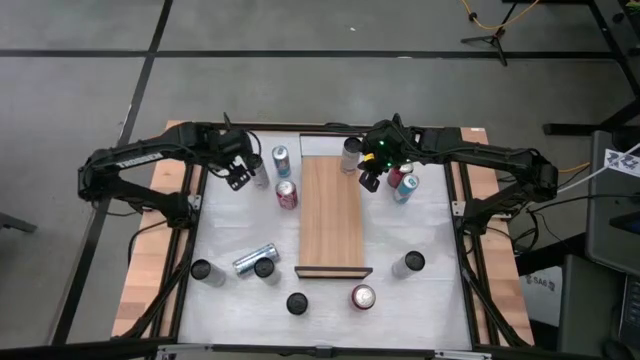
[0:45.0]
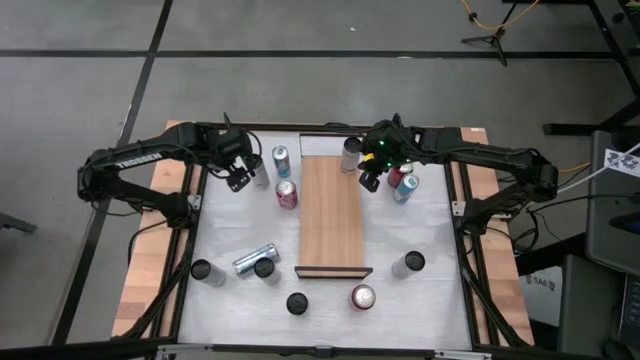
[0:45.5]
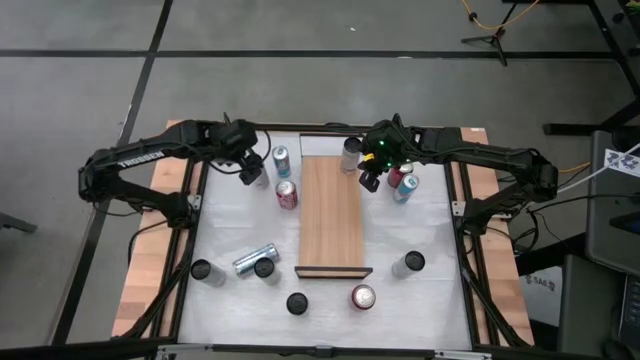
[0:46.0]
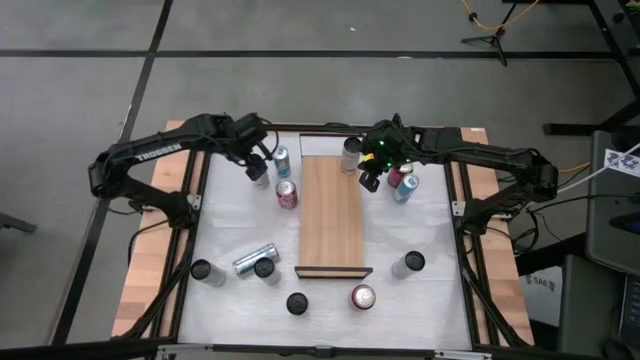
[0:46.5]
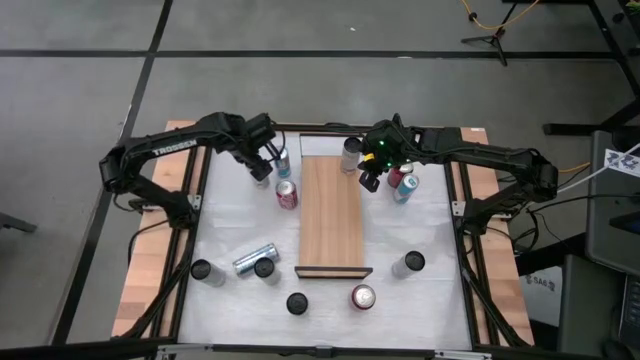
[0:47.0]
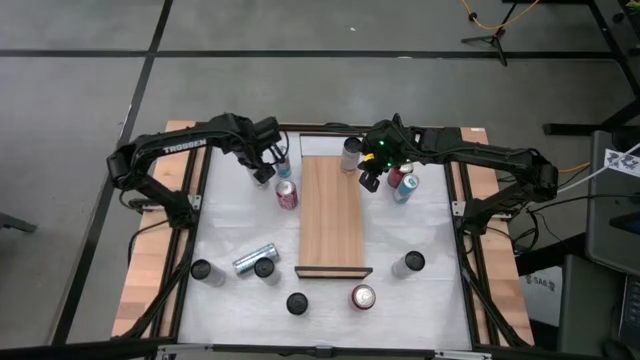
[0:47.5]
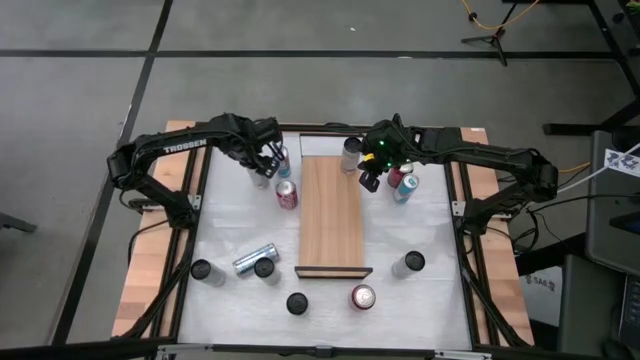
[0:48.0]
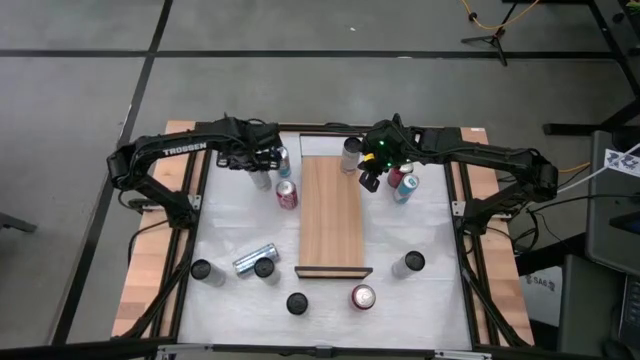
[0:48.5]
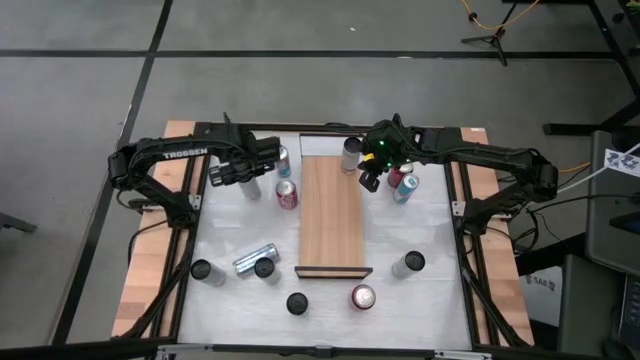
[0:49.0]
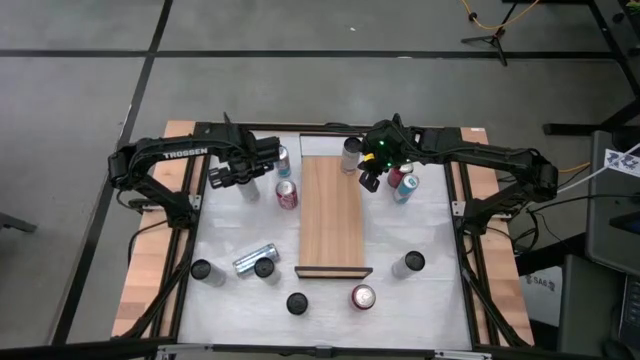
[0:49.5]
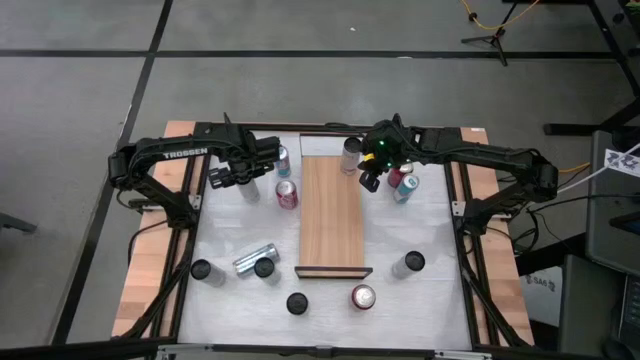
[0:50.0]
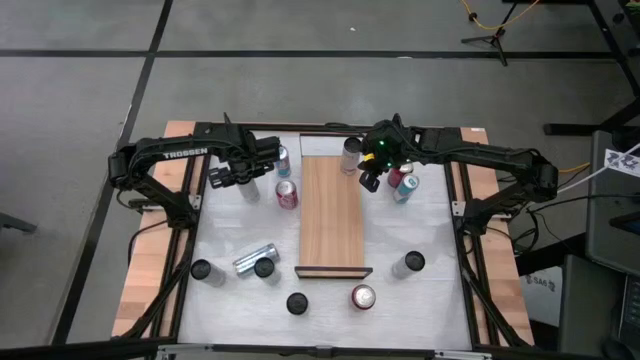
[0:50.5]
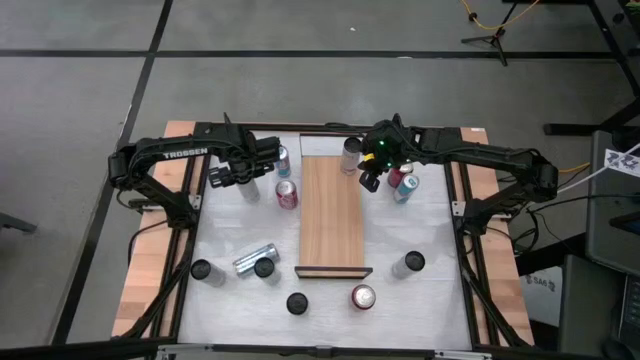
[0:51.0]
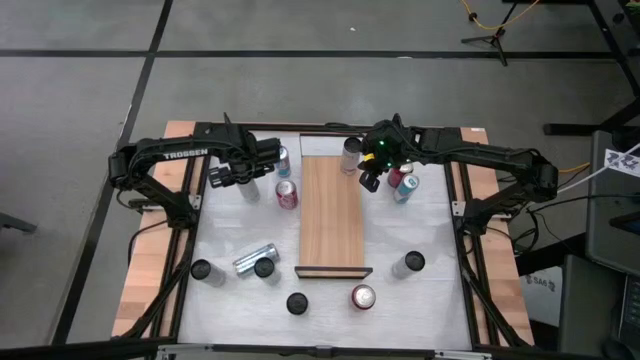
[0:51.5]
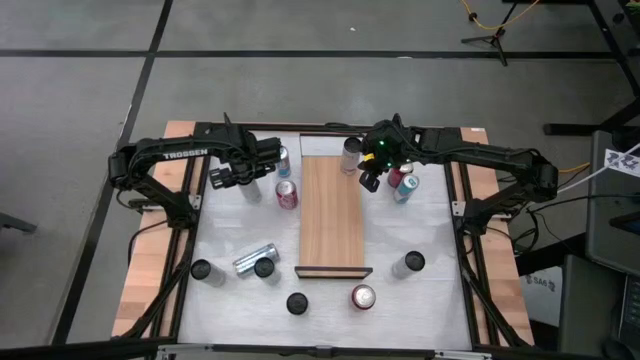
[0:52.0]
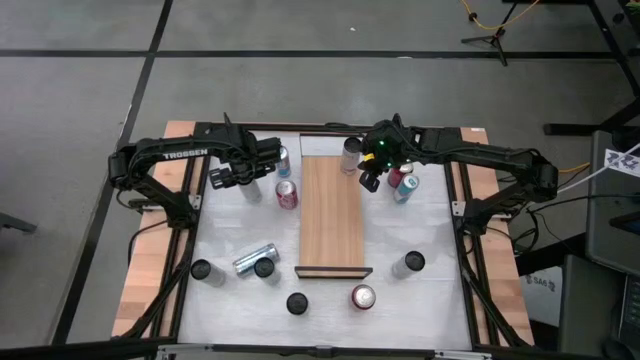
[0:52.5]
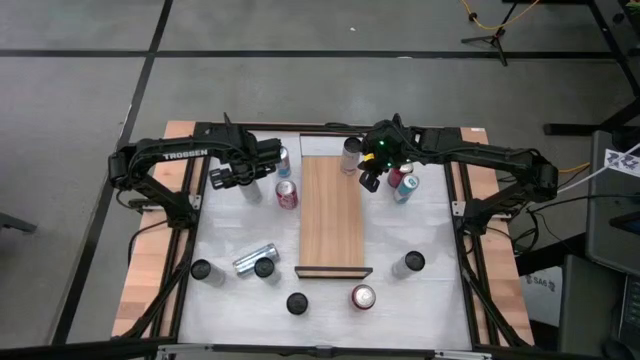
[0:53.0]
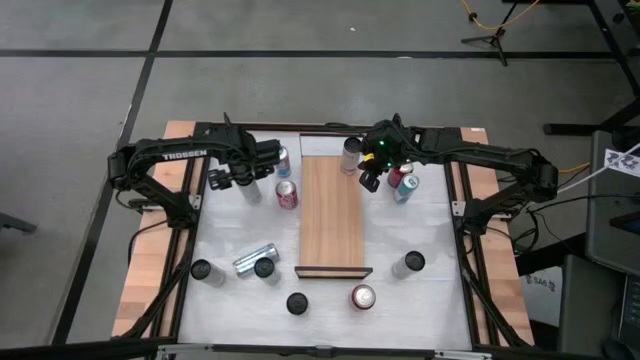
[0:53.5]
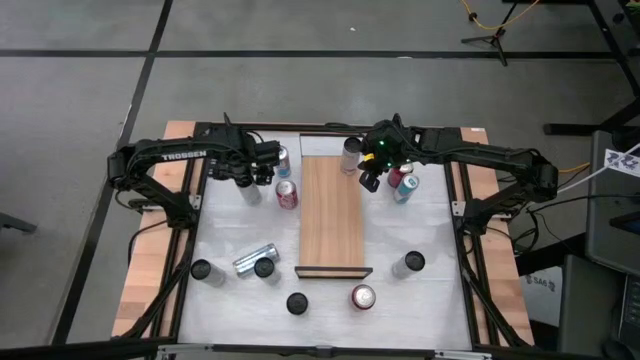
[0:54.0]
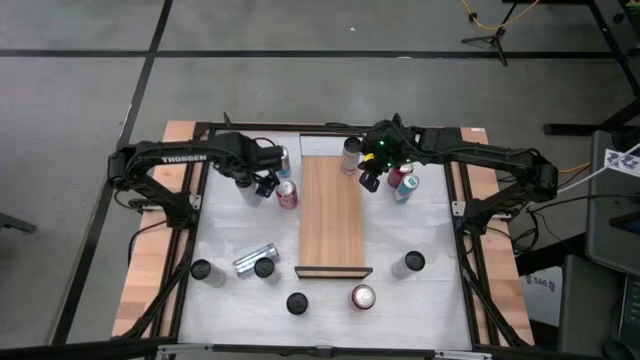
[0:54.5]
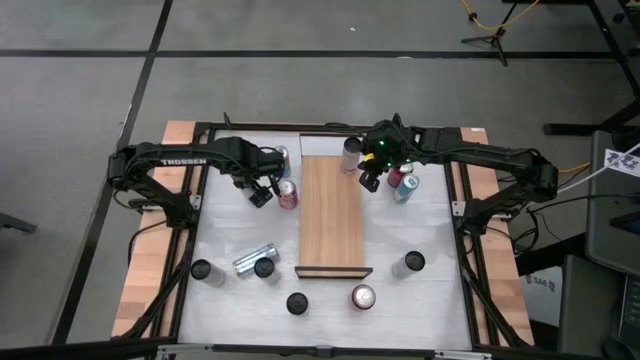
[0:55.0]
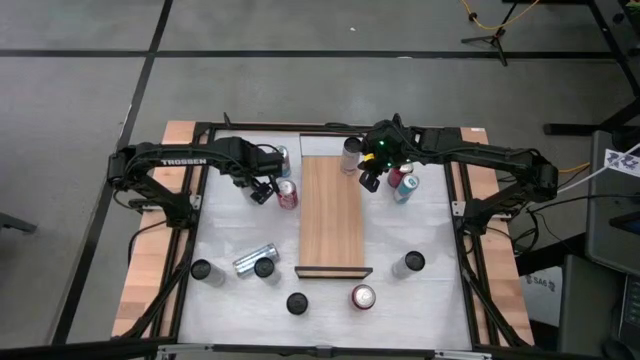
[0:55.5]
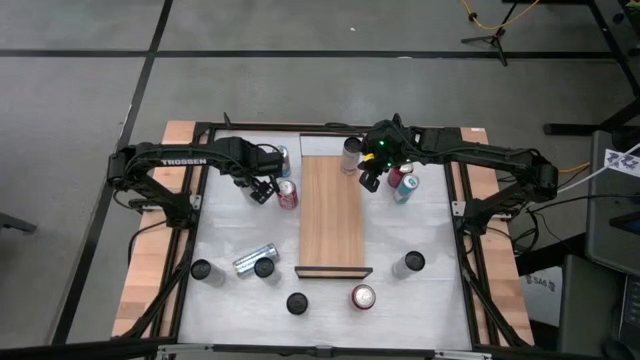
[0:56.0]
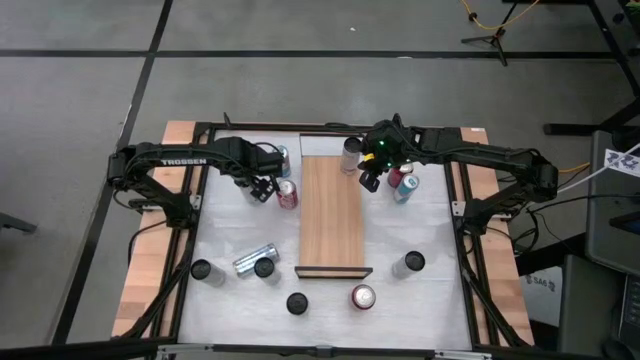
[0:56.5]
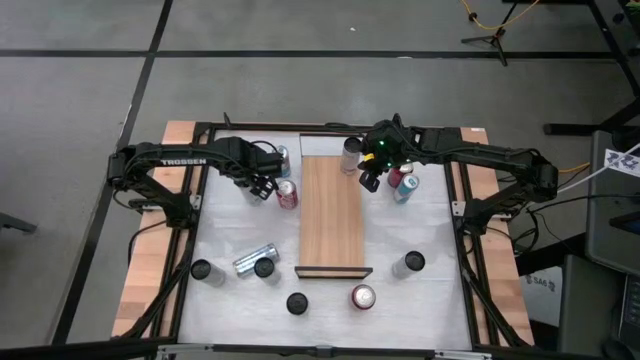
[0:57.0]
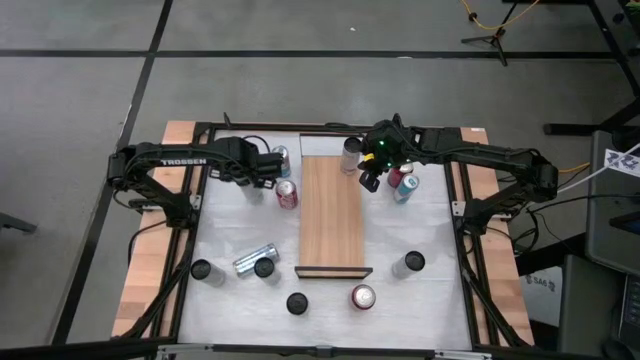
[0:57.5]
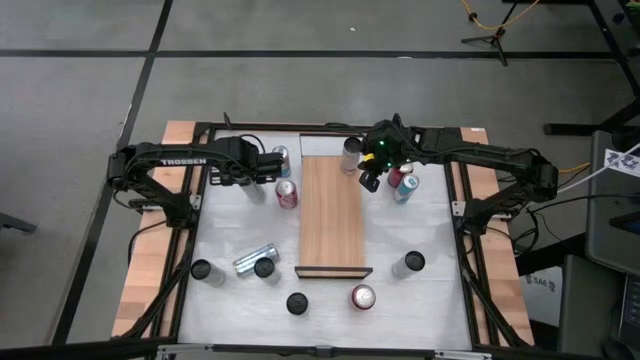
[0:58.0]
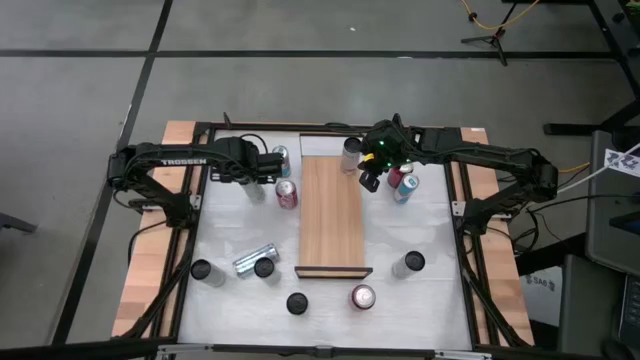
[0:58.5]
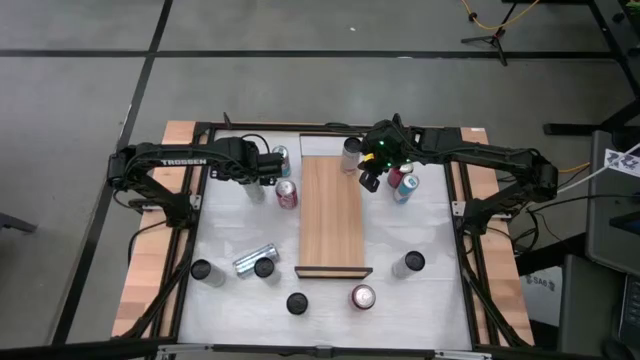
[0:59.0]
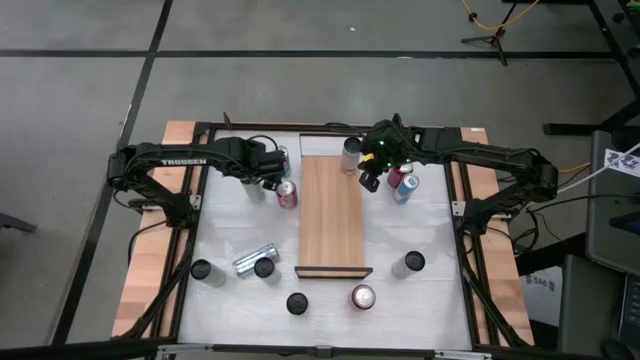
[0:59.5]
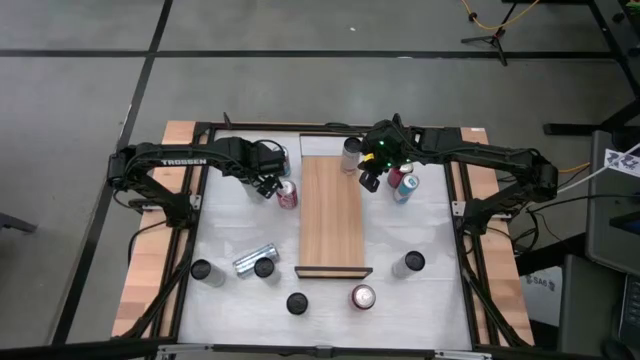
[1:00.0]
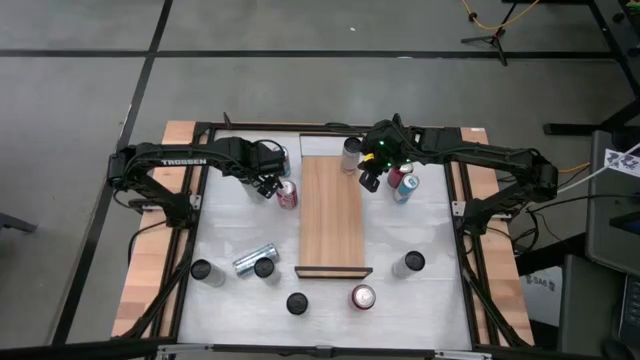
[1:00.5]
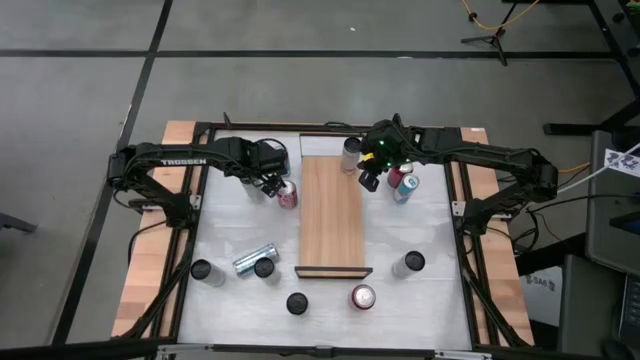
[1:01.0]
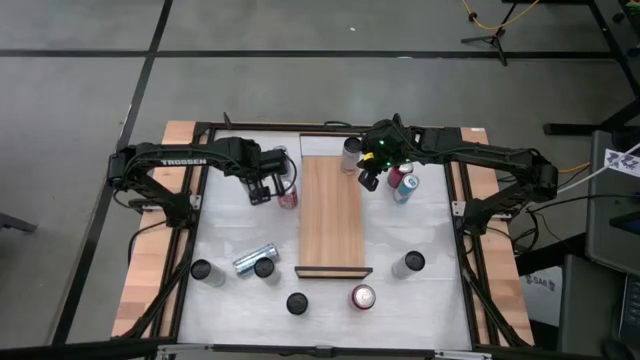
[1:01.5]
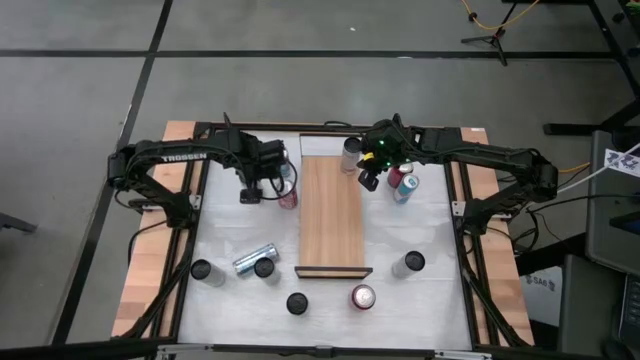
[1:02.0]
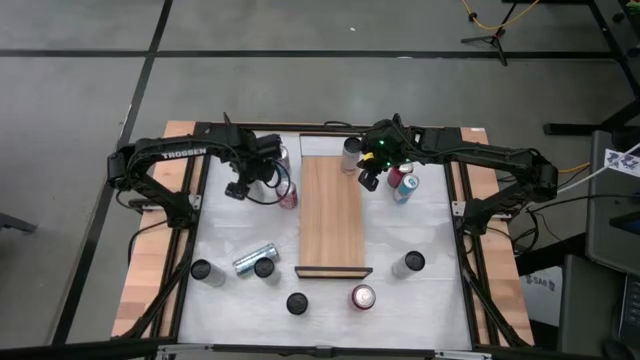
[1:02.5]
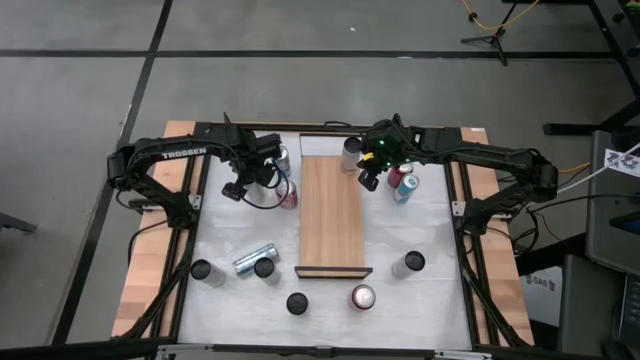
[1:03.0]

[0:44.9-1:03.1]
Task: Place canned beverage on shelf
Put the white pink soda can on the shelf aligned with the other white pink soda can

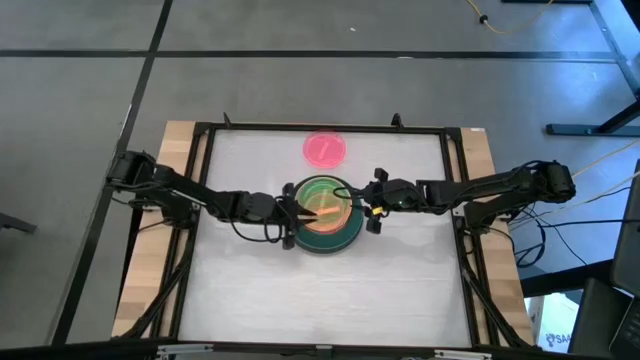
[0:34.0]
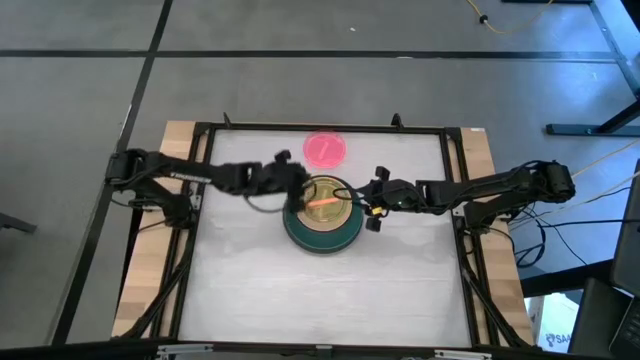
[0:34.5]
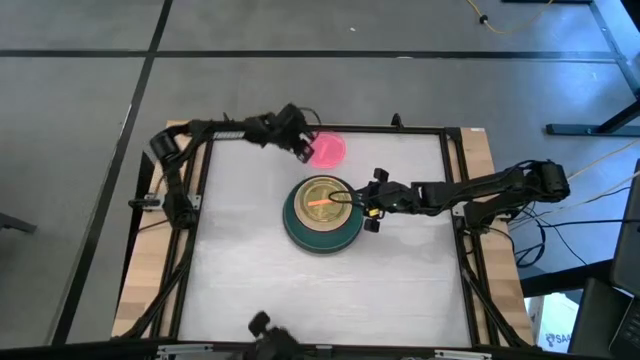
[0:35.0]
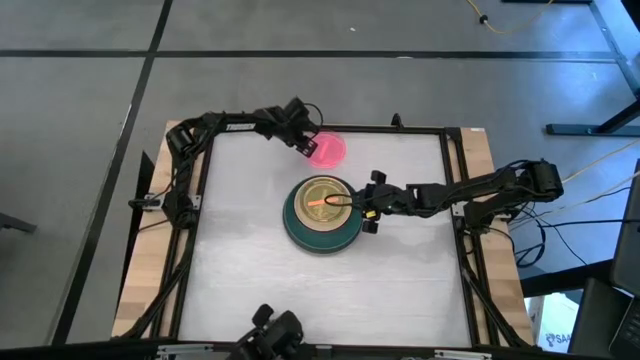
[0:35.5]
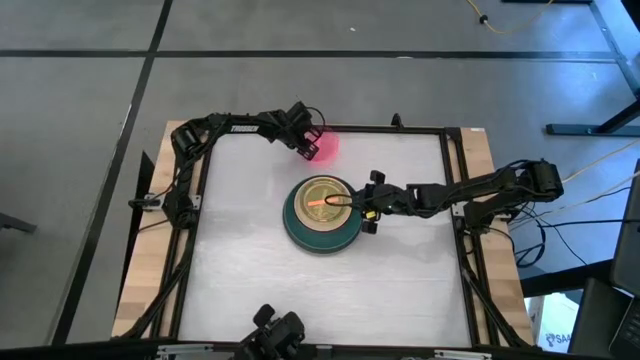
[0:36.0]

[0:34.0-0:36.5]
Task: Stack plastic plates
Stack the small pink plate on top of the small orange plate

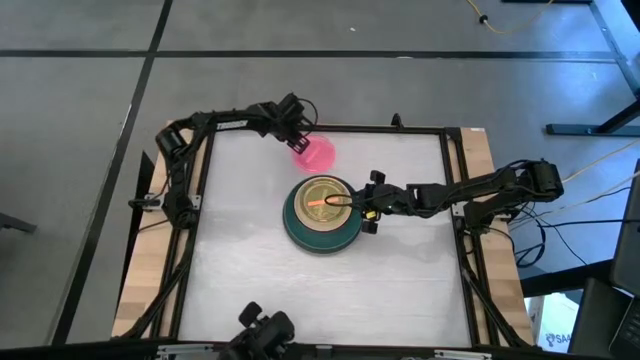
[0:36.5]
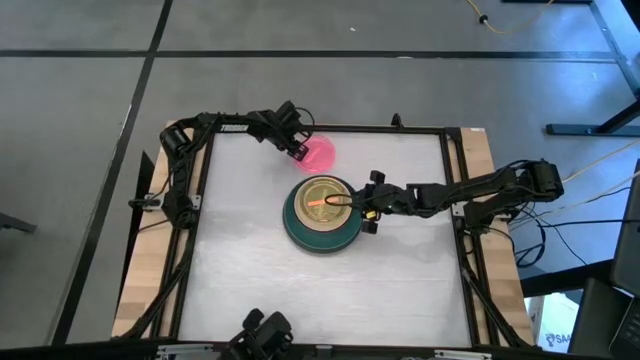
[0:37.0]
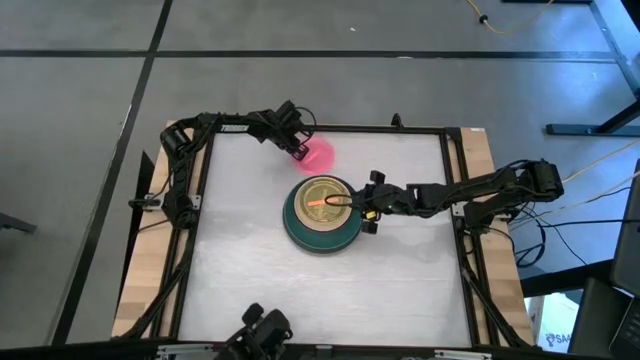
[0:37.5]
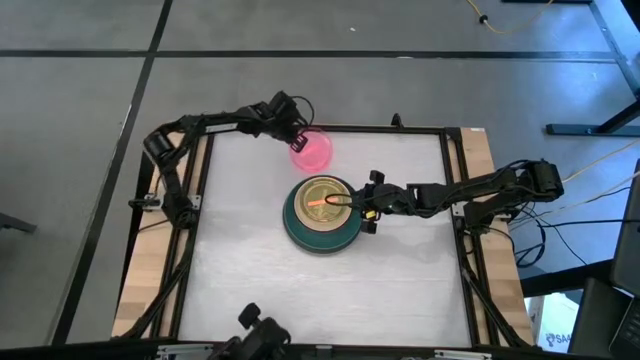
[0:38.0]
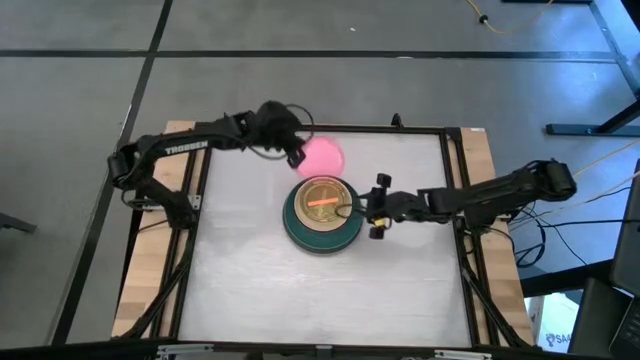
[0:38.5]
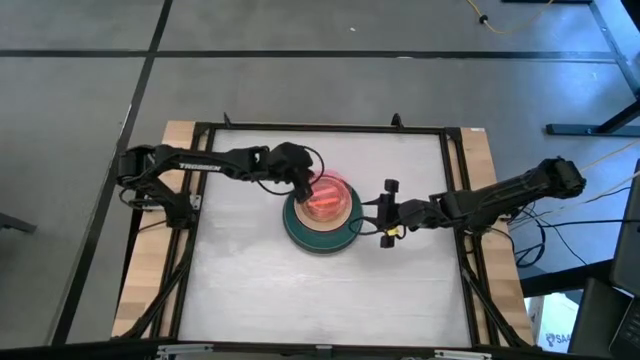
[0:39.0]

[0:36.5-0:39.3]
Stack the small pink plate on top of the small orange plate
